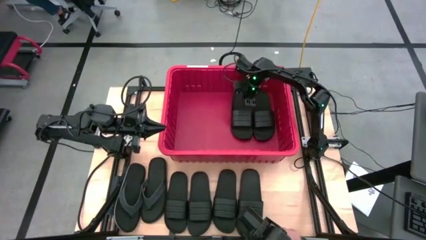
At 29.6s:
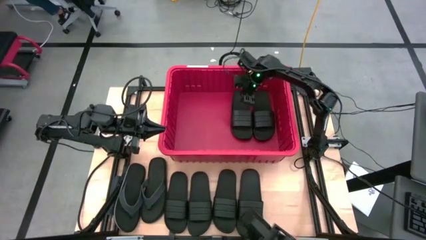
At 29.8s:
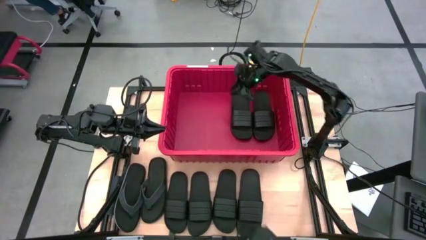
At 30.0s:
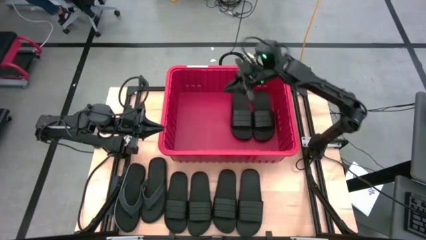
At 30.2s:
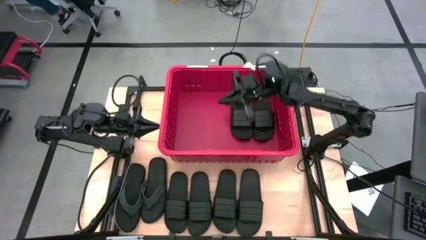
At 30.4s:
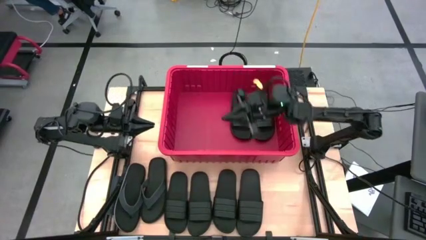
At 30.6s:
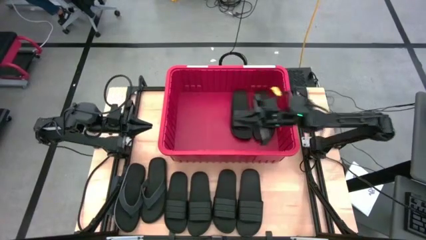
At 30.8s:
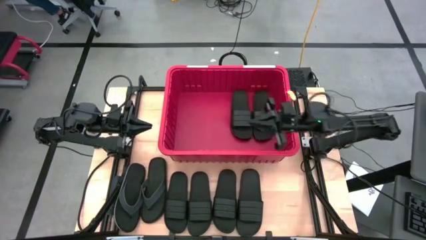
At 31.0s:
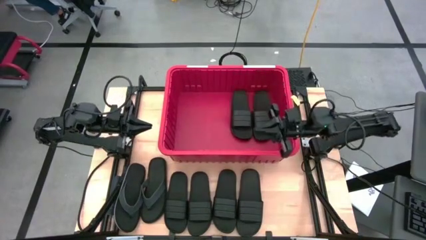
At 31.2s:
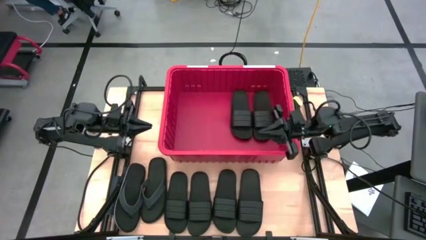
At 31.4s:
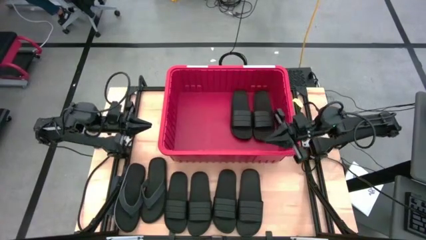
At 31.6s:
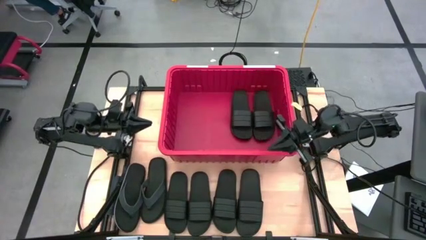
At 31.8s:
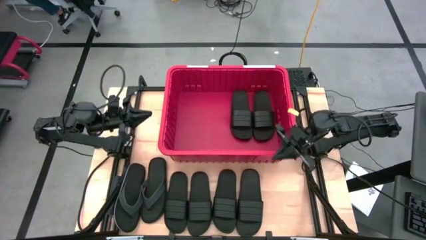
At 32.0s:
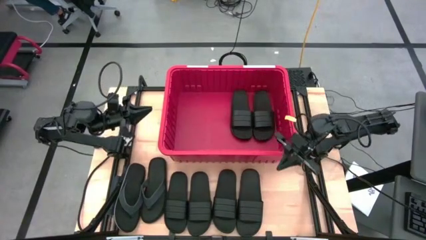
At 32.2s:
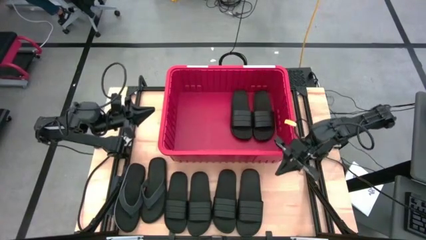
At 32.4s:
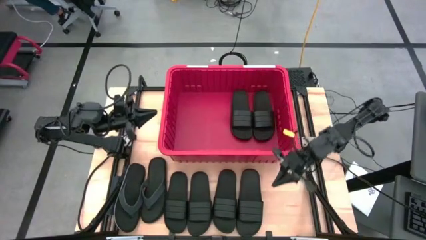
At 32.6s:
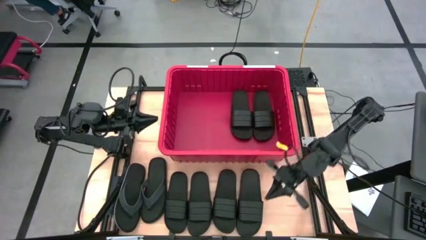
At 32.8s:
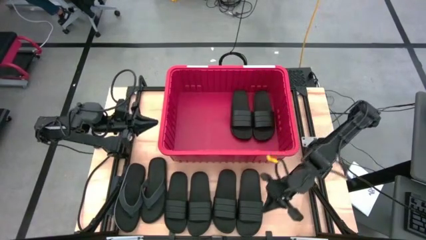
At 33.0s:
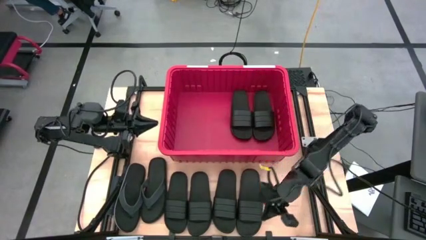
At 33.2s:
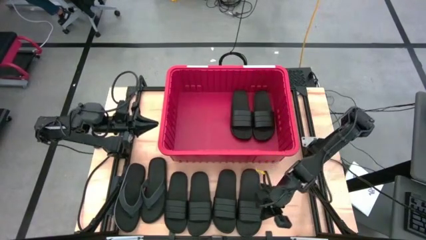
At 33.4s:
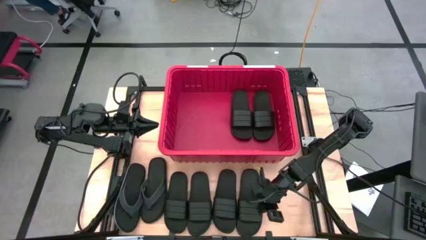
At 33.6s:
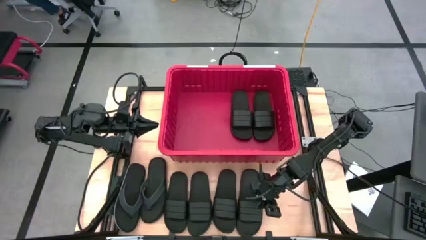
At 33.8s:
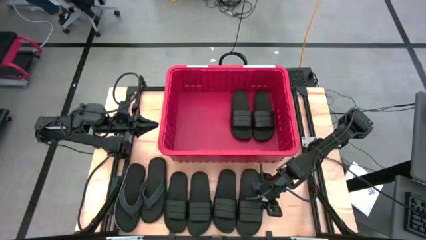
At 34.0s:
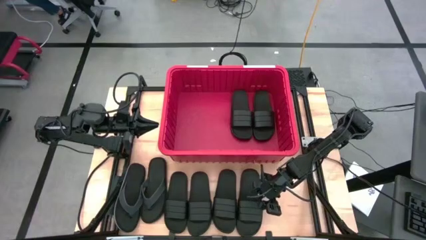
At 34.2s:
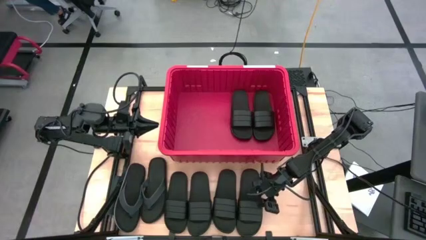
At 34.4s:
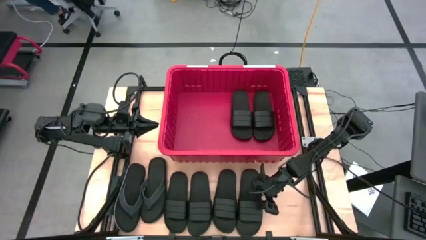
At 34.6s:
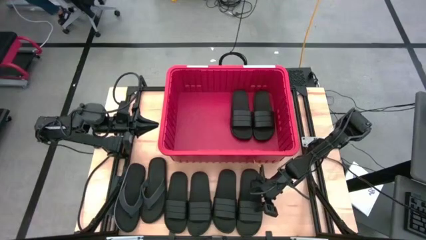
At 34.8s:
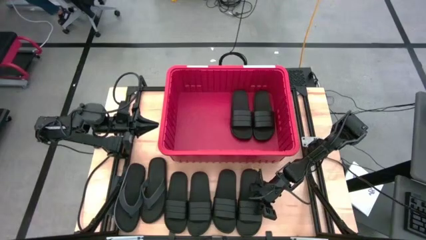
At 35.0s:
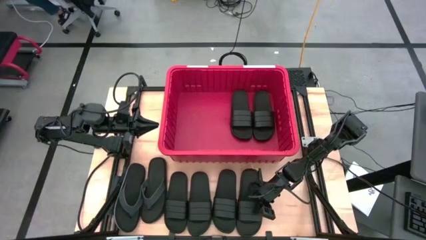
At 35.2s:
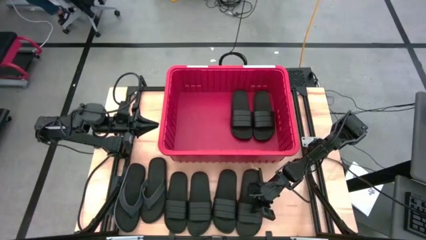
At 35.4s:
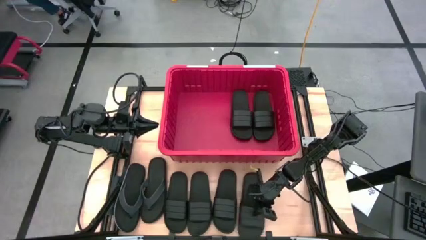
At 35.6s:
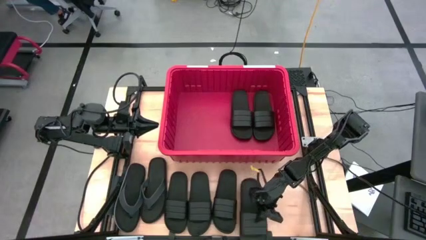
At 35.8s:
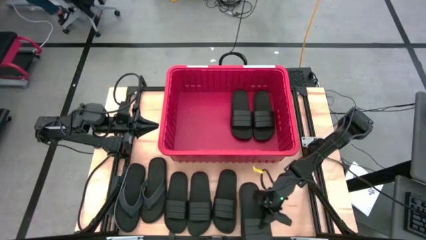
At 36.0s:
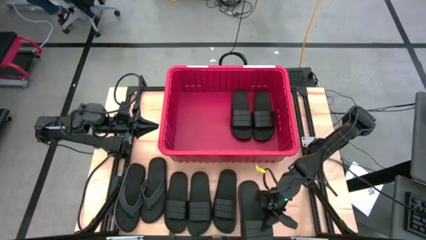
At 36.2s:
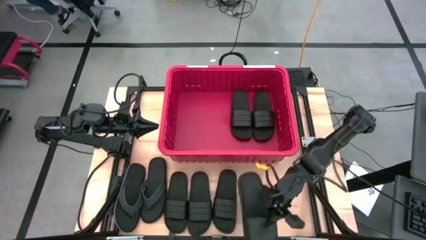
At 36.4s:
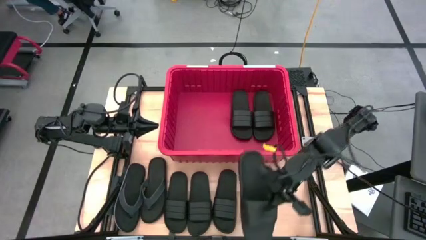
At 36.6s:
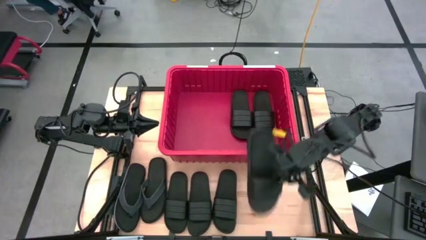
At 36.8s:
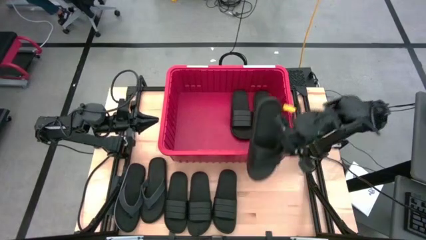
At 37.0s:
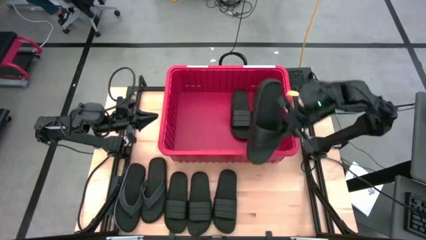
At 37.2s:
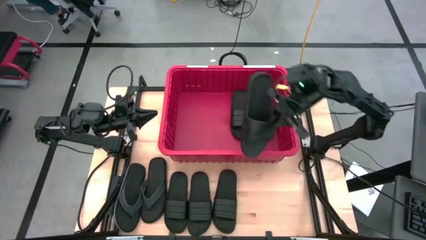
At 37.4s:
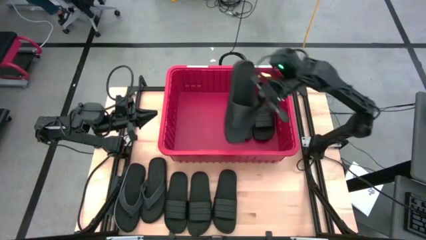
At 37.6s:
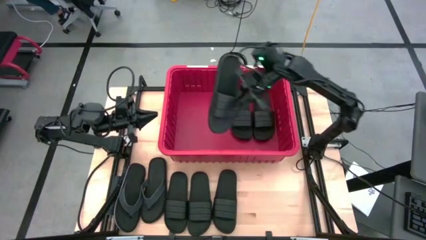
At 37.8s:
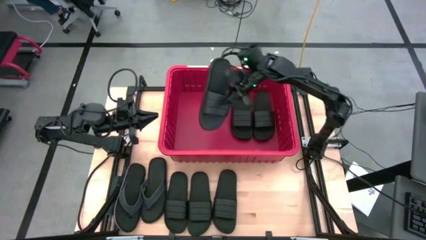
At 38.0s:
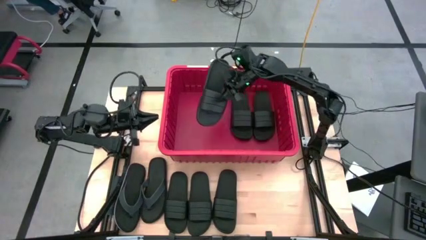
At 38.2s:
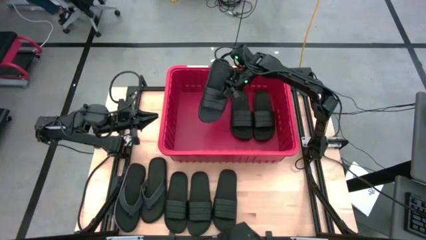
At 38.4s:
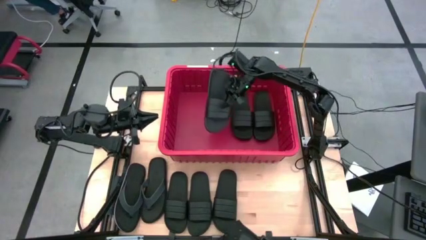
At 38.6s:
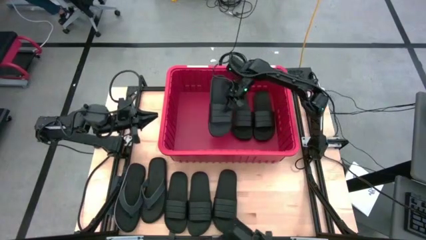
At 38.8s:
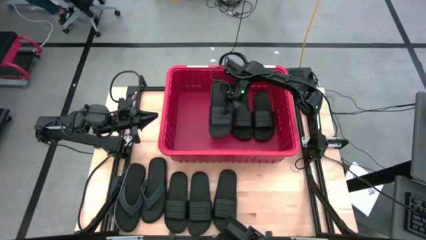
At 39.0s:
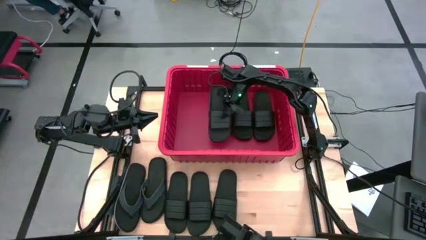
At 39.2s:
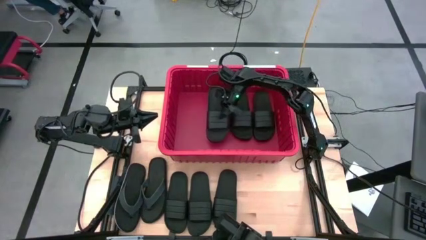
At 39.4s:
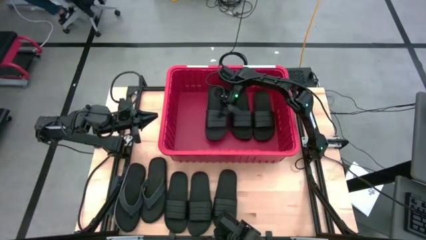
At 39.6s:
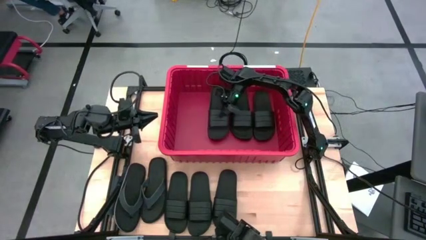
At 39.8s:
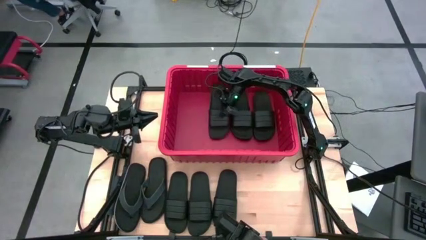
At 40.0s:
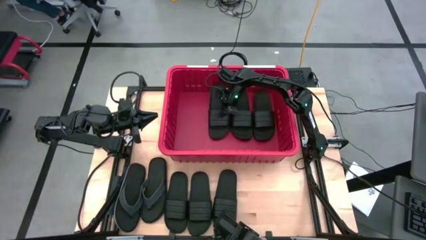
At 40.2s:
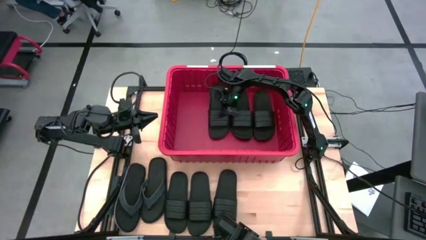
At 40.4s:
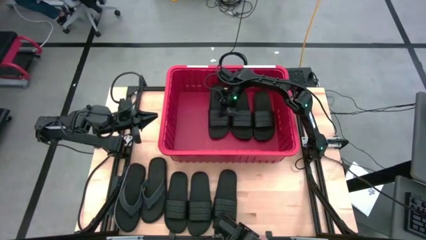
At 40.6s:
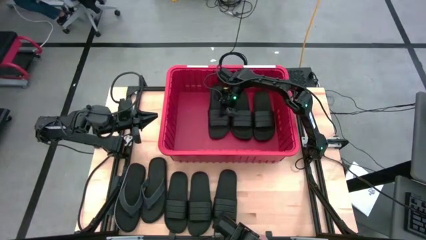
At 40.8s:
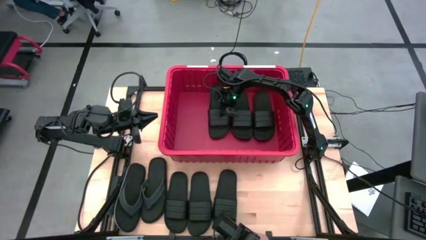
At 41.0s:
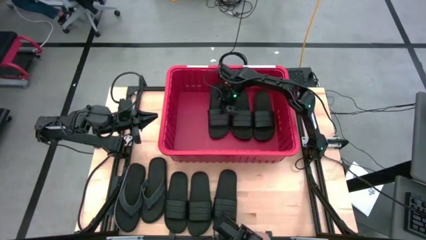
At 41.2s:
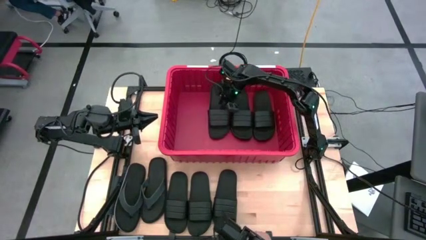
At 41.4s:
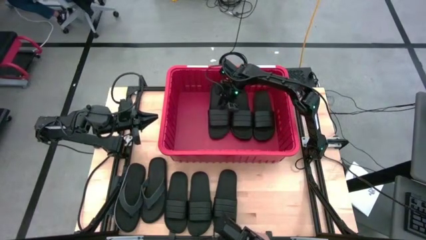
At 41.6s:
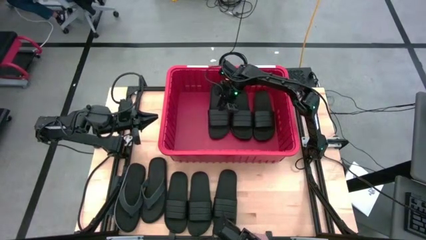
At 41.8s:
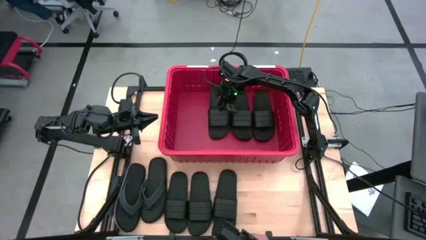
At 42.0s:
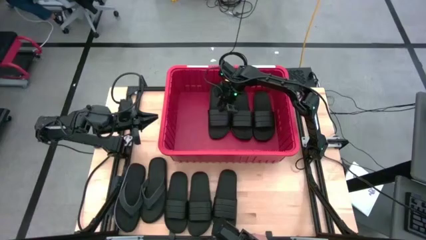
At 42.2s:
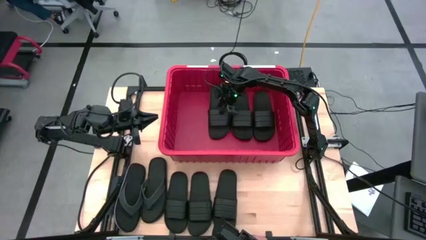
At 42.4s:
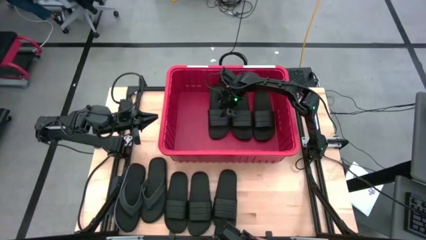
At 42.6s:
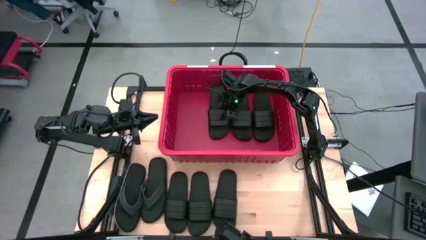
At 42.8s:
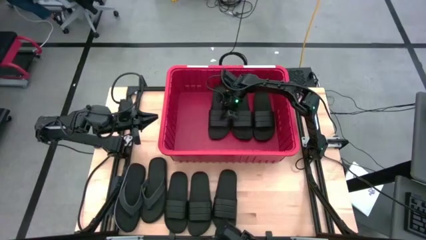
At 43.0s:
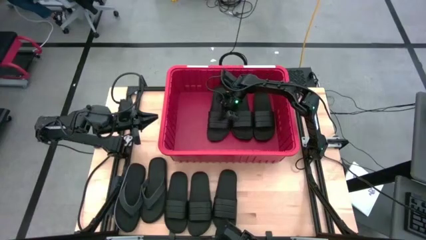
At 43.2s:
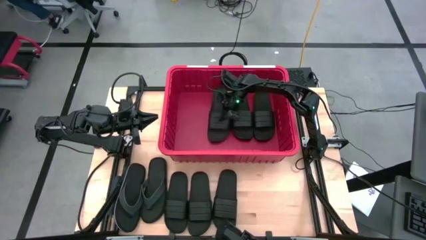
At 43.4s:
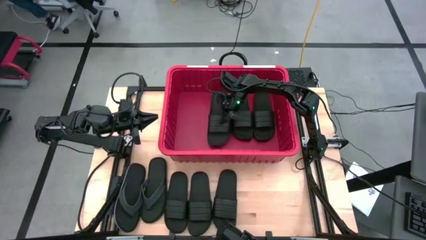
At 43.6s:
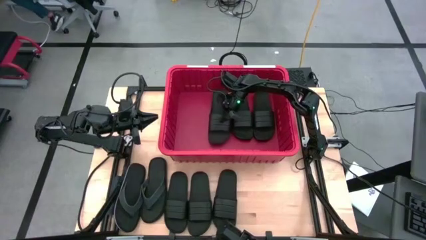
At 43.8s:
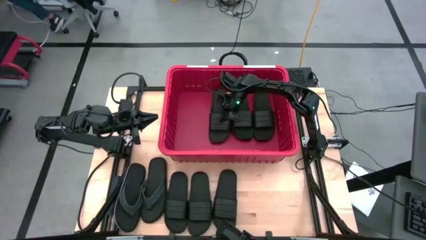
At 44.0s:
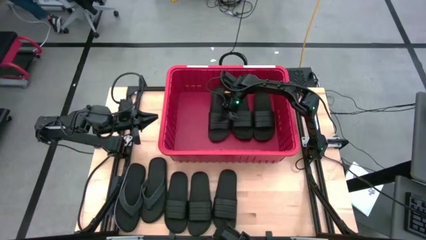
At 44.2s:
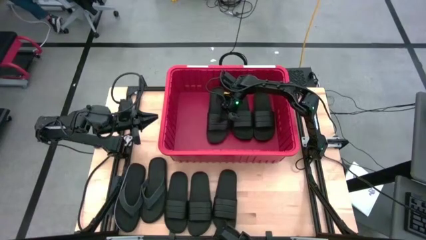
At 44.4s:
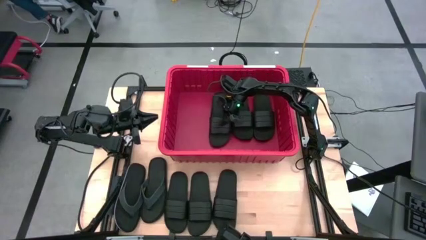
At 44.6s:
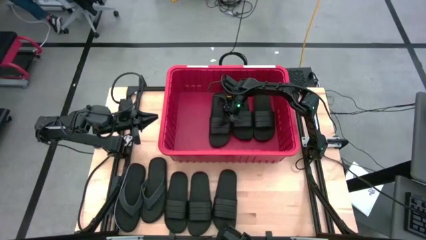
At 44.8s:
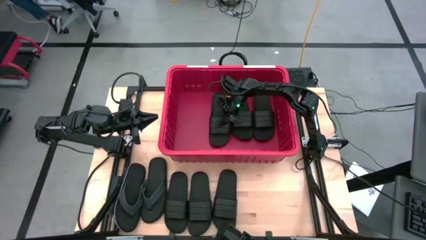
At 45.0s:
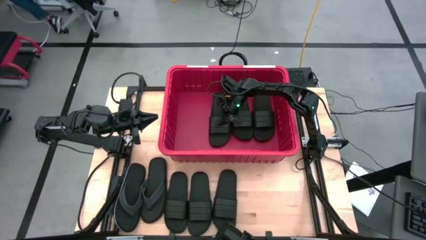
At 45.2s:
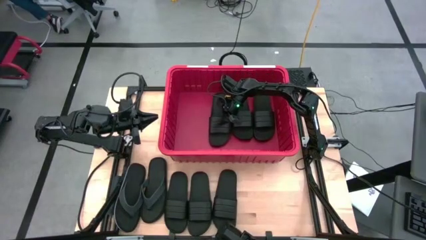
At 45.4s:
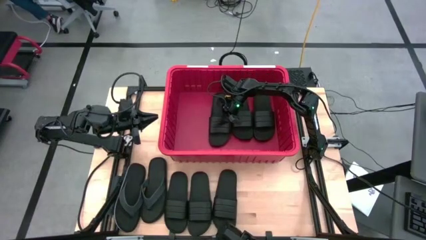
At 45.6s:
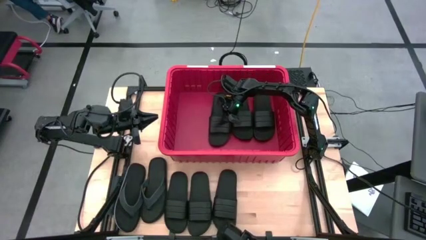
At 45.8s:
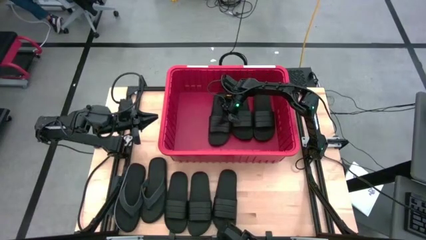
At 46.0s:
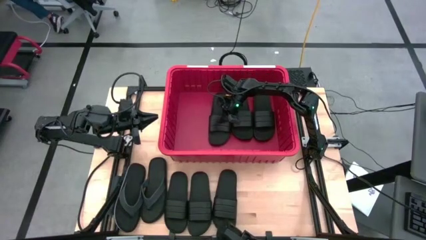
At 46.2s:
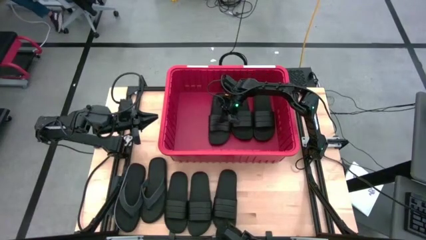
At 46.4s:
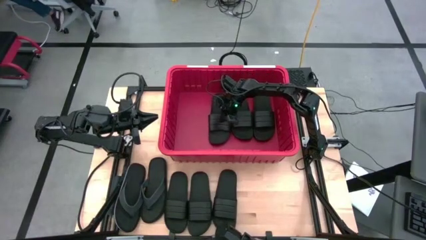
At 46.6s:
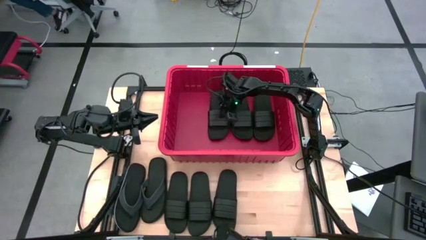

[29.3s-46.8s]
Task: Pick and place slides into bin
Put the black slide into the red bin
